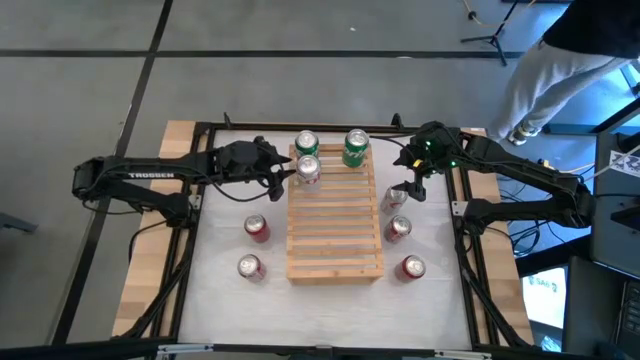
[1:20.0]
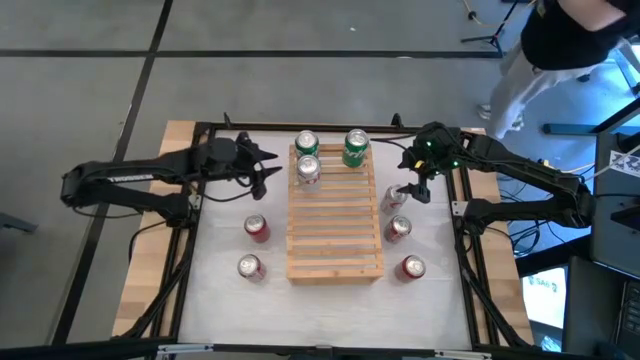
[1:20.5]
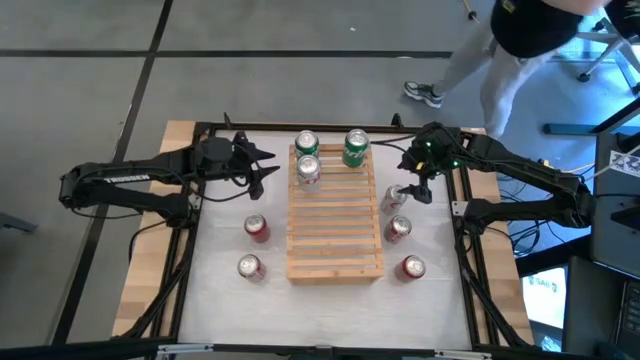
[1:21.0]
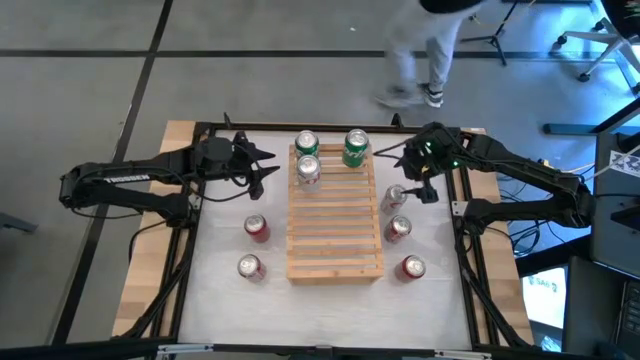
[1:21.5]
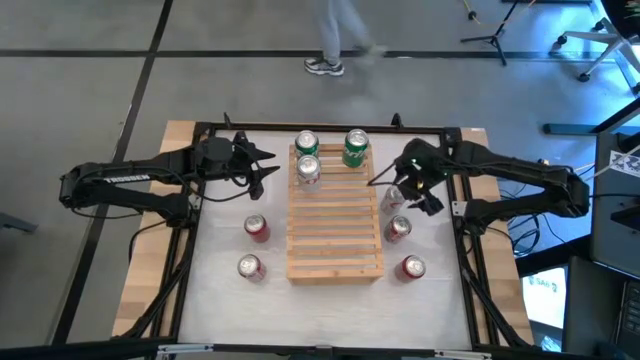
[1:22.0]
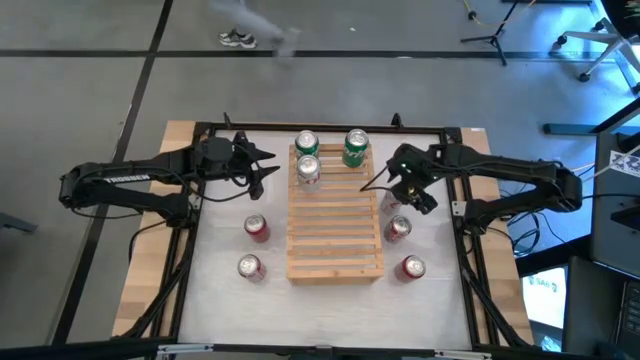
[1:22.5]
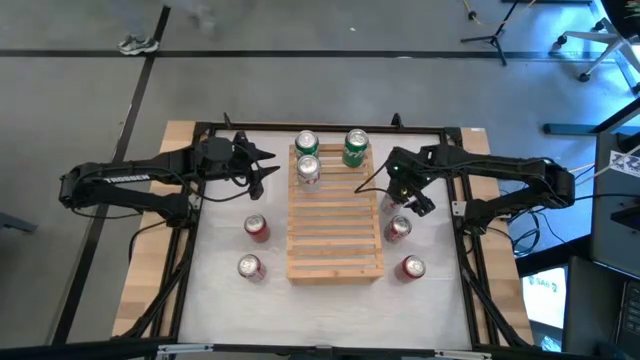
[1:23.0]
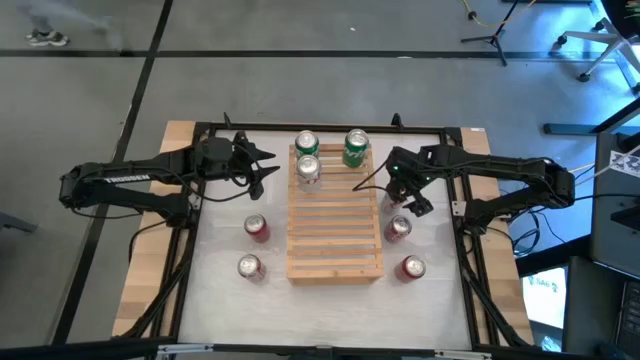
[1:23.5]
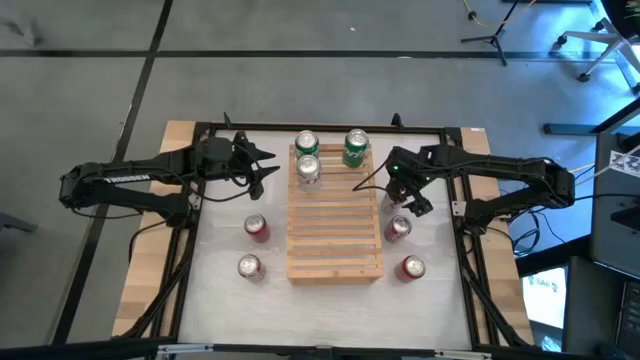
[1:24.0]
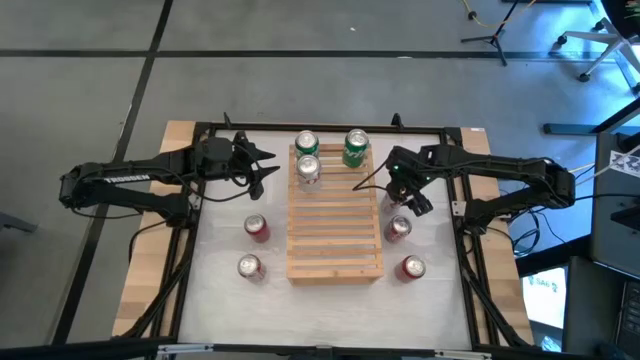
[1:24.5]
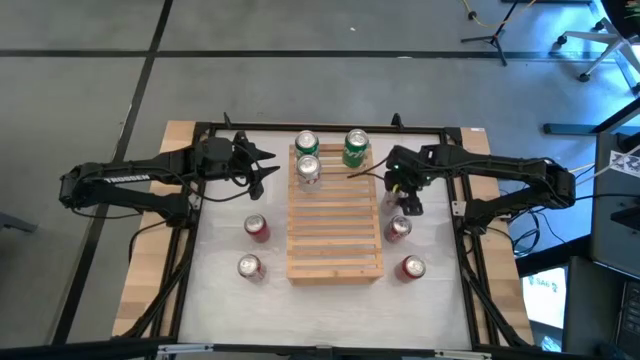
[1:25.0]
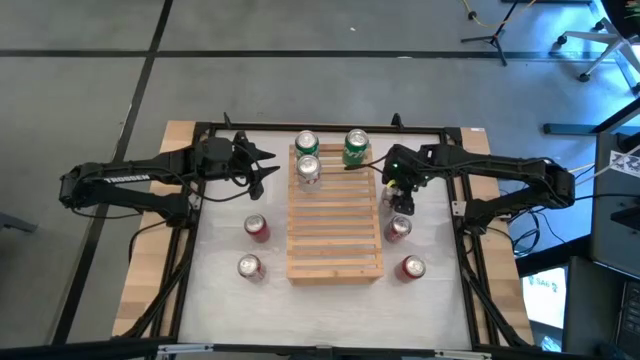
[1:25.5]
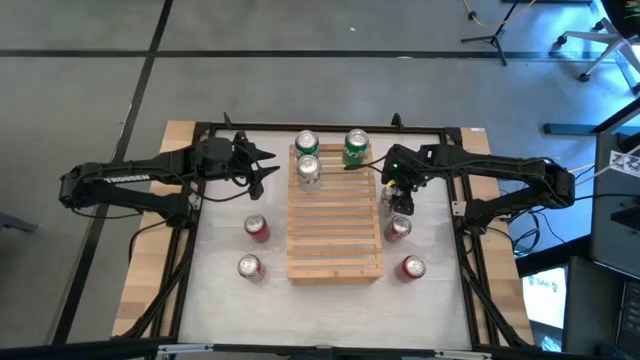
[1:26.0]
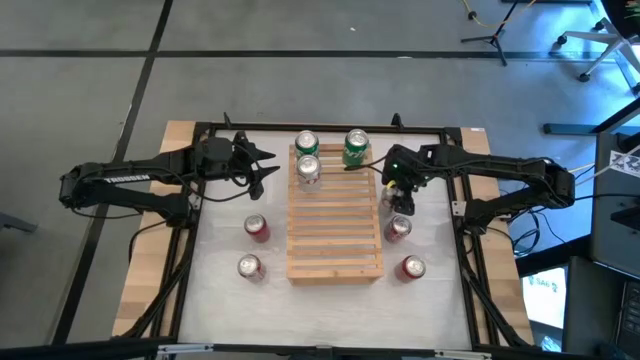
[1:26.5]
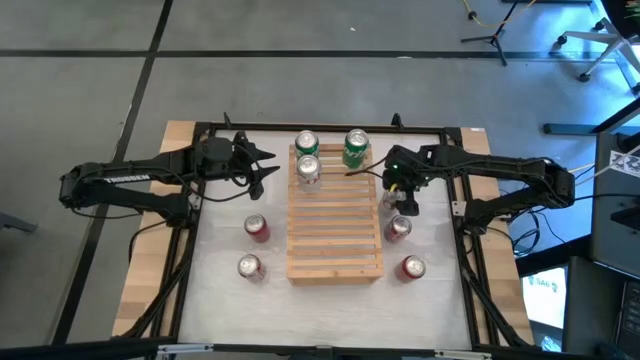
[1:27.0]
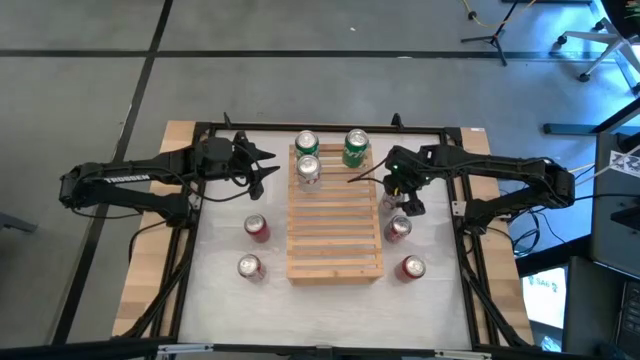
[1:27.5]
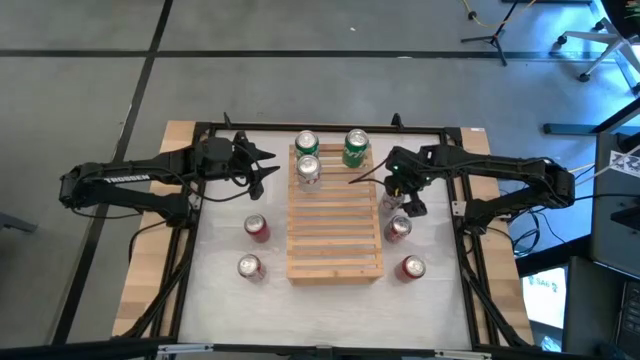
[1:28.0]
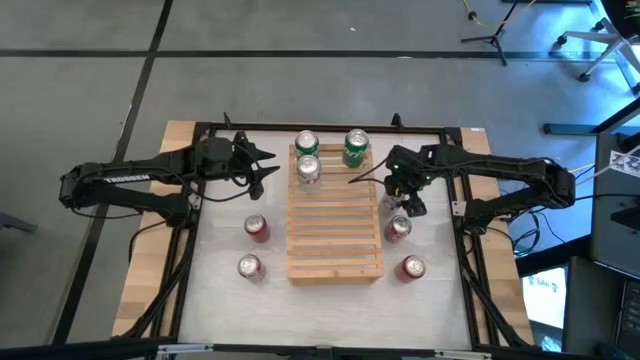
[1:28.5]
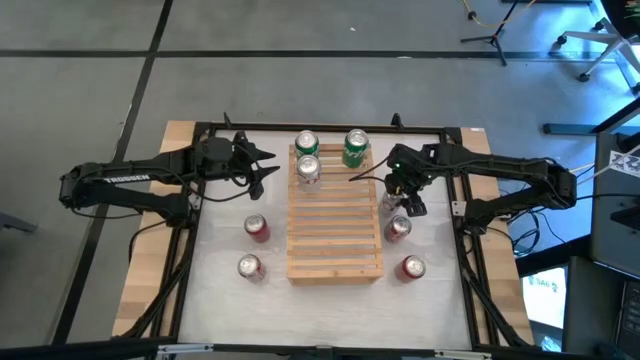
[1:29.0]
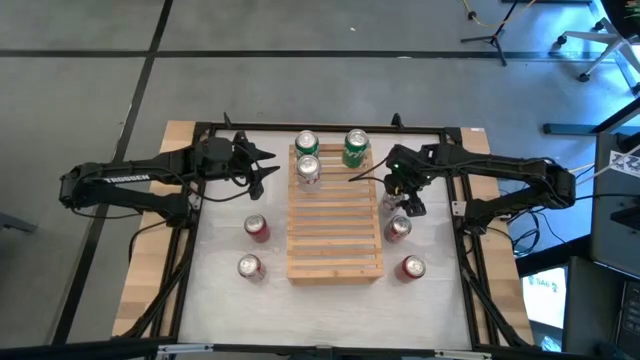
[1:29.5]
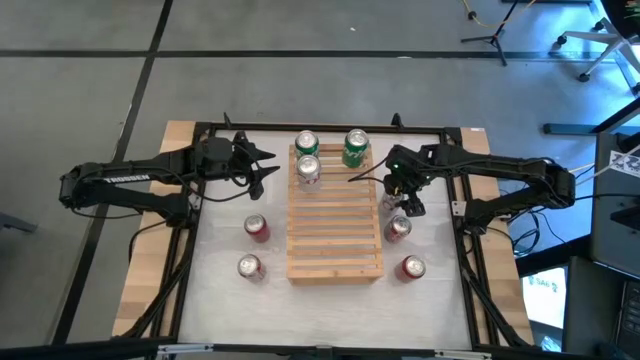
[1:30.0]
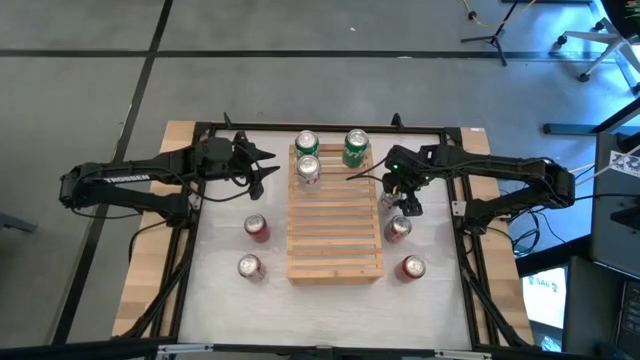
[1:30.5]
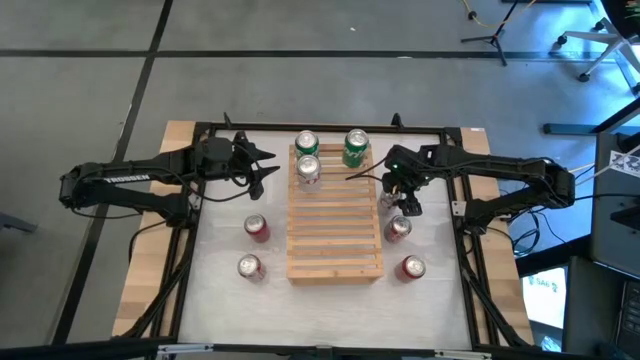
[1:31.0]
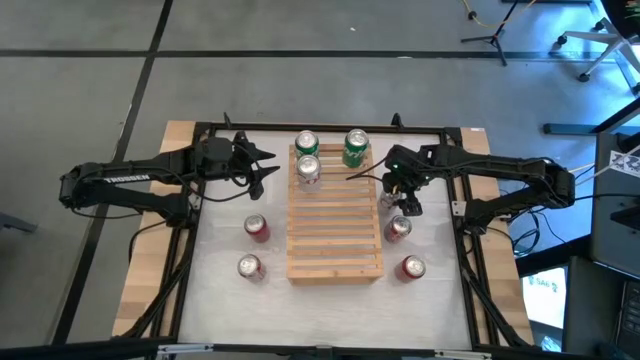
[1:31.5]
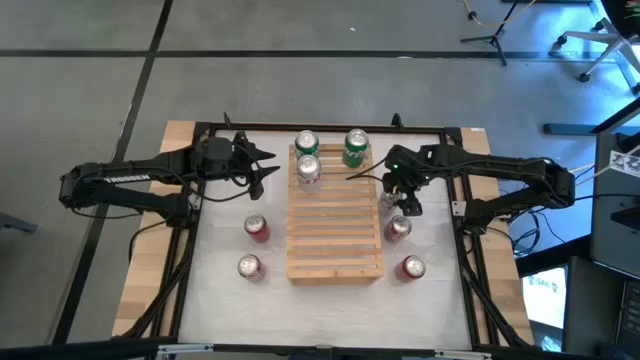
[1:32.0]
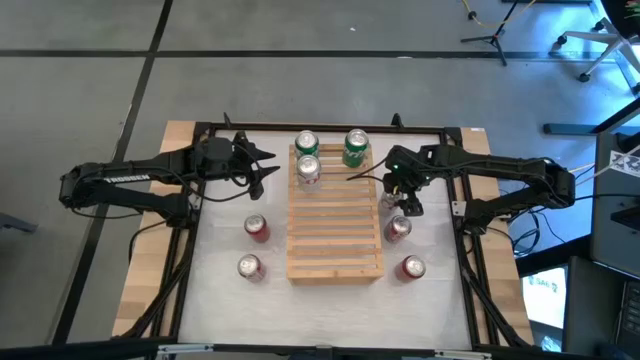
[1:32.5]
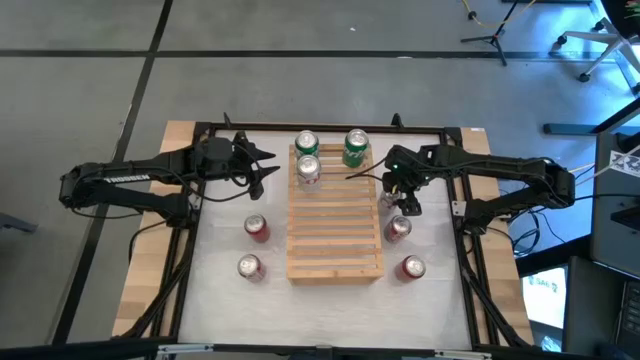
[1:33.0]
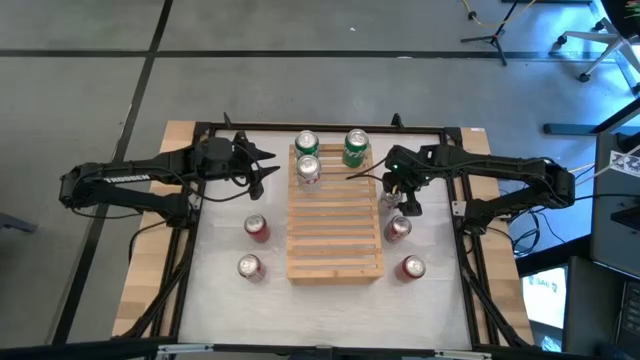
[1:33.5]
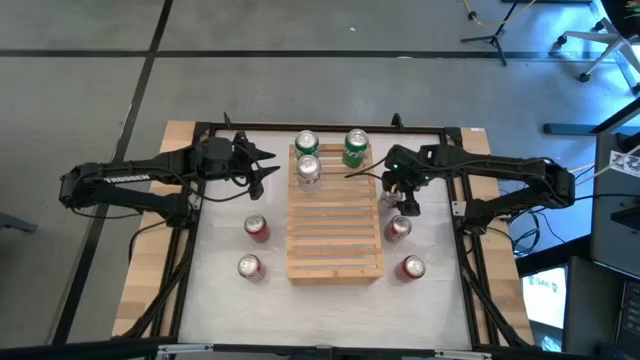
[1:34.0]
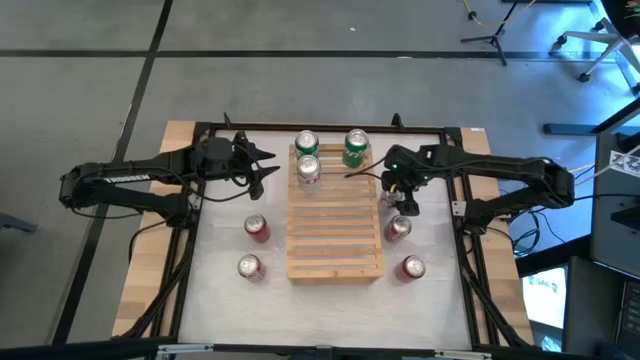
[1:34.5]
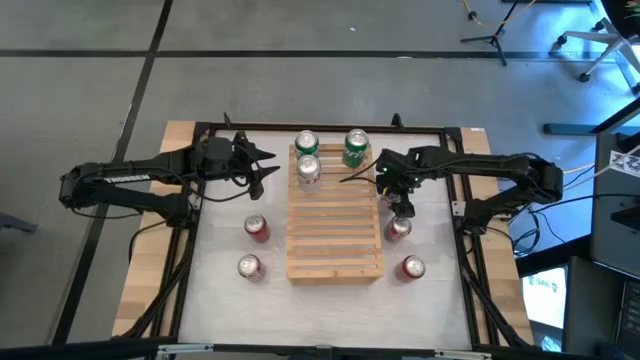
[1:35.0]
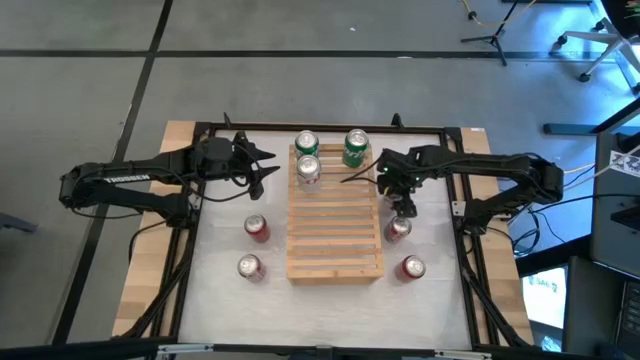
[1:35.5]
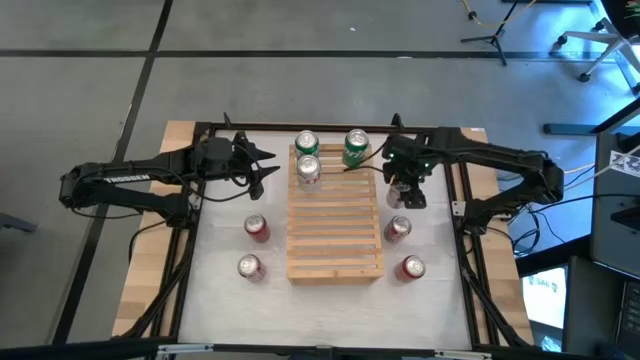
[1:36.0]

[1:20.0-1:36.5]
Task: Place canned beverage on shelf
Put the red and silver soda can on the shelf aligned with the red and silver soda can
